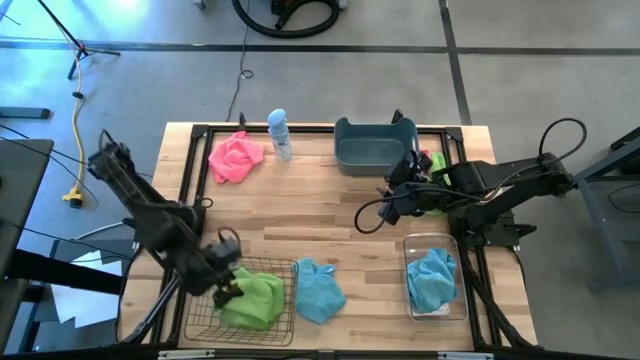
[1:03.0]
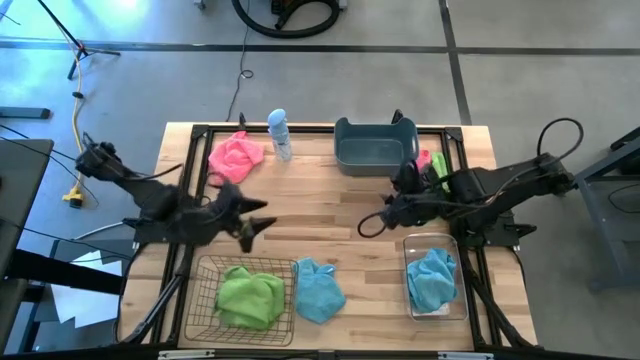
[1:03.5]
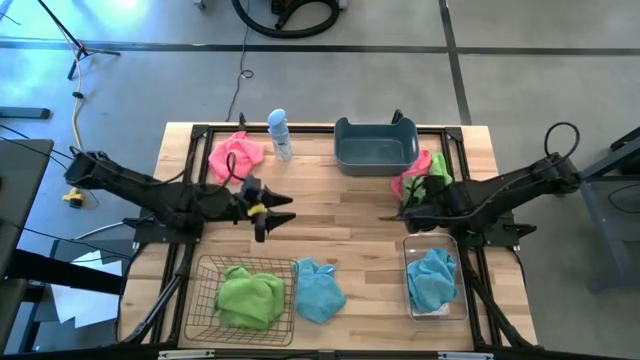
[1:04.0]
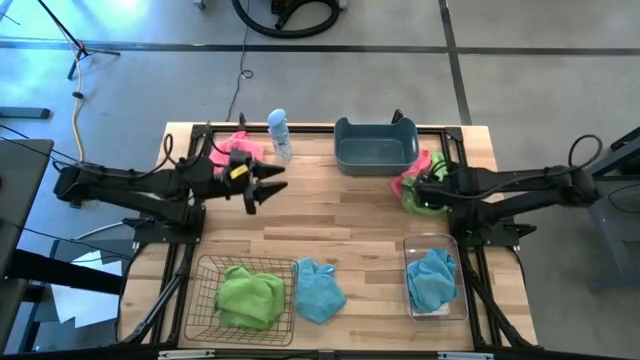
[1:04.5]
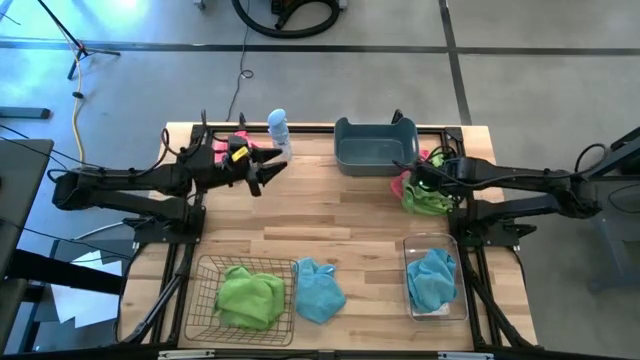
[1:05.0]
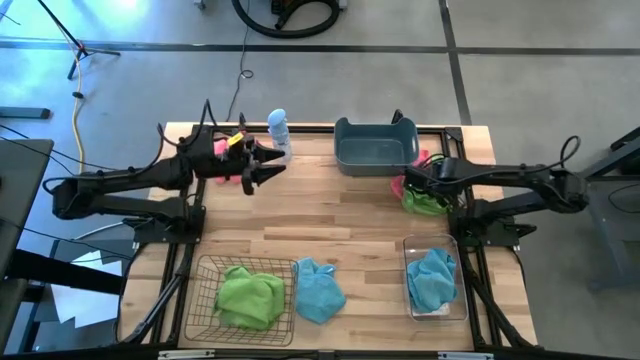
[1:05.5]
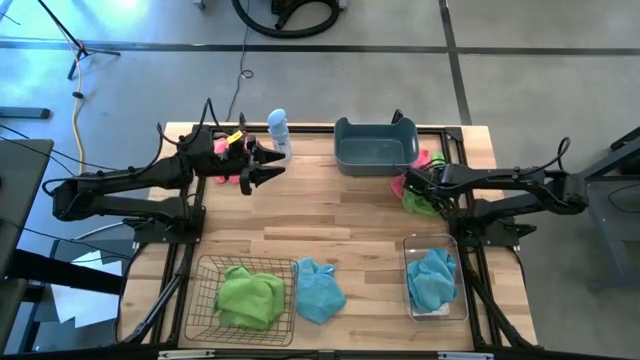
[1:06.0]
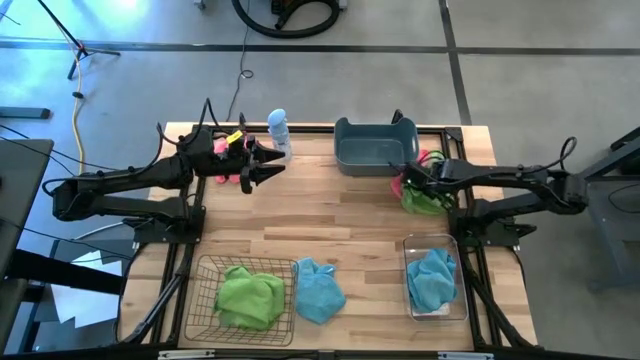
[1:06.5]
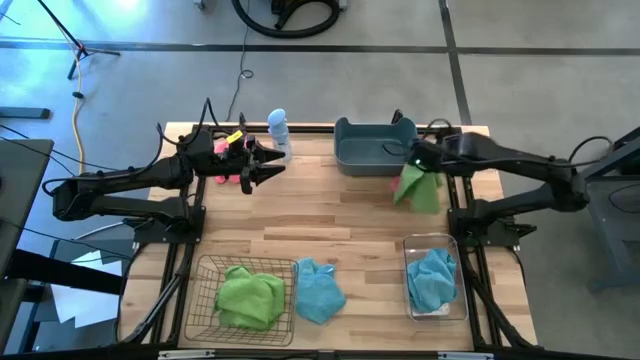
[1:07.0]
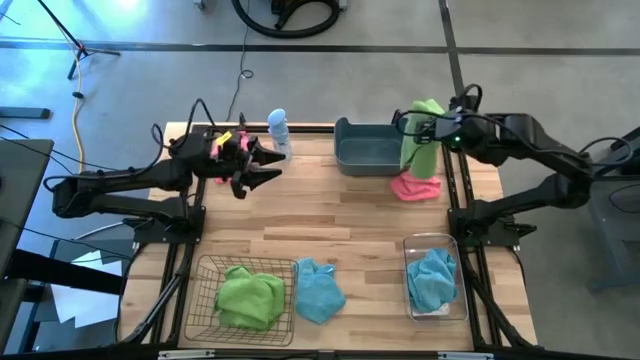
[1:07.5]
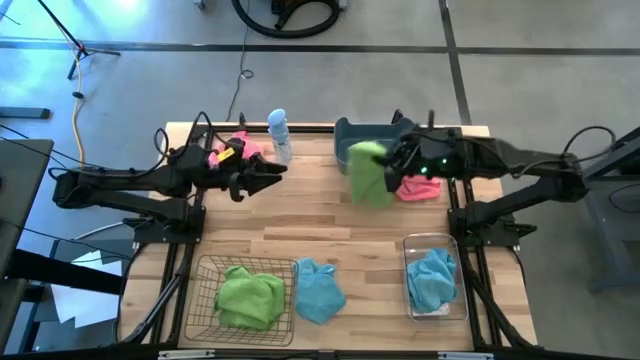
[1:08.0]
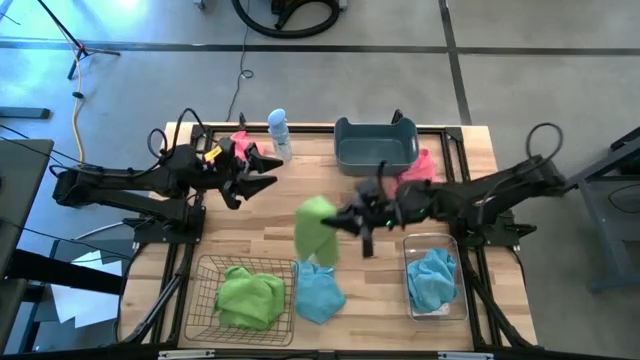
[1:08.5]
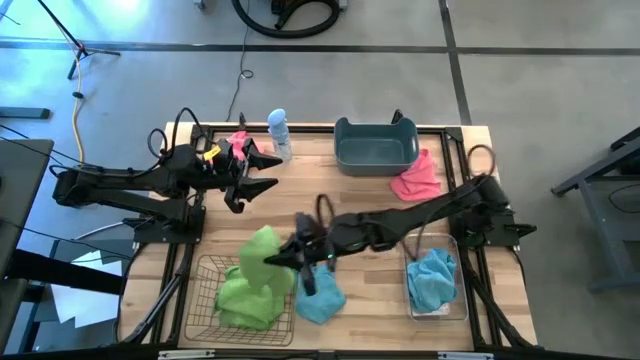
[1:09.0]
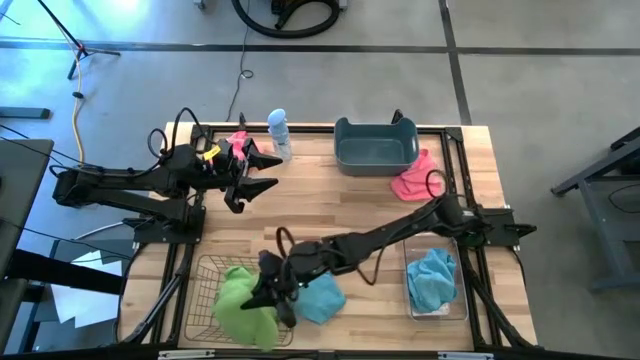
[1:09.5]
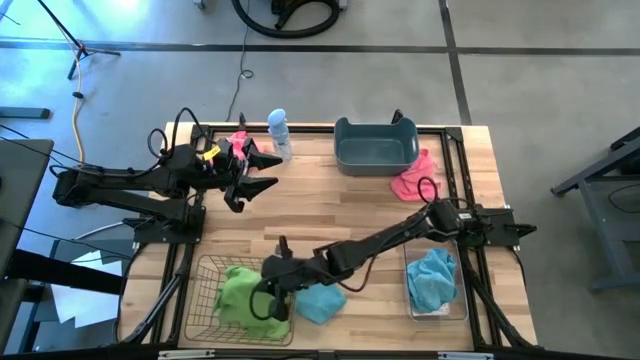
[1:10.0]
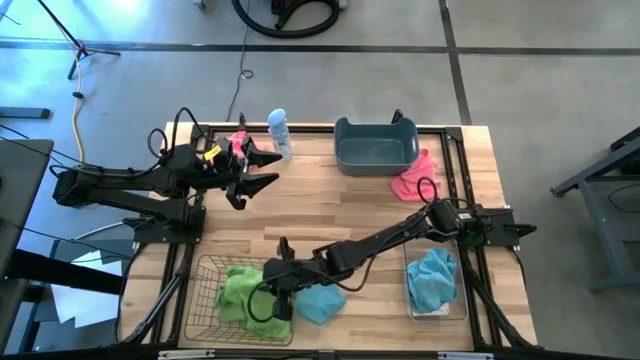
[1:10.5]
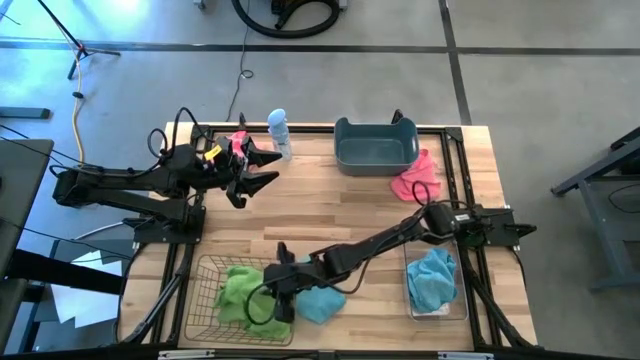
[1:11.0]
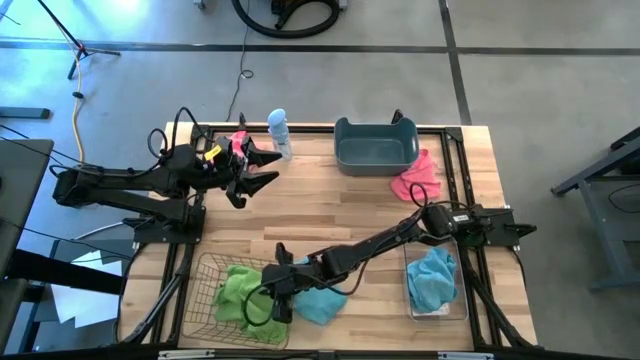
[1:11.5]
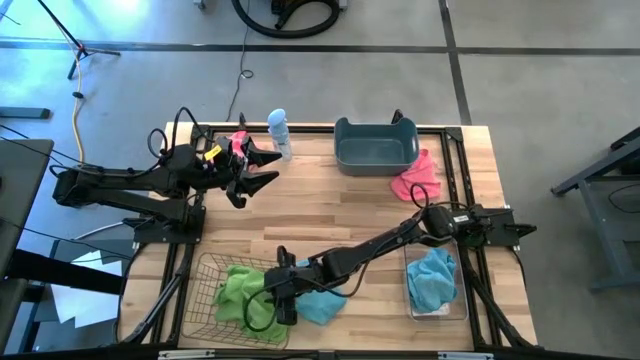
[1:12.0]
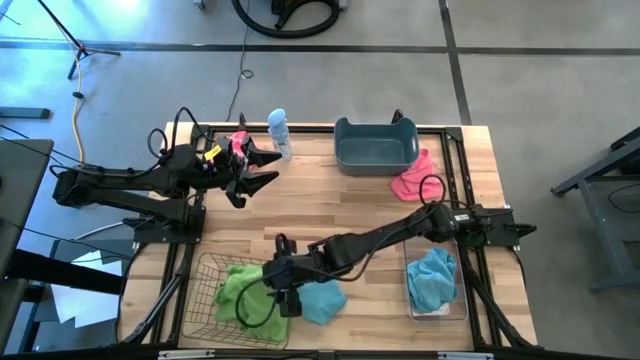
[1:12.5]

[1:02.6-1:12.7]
Task: Sort microfiber towel by color & place in baskets
Put the green towel into the wire basket

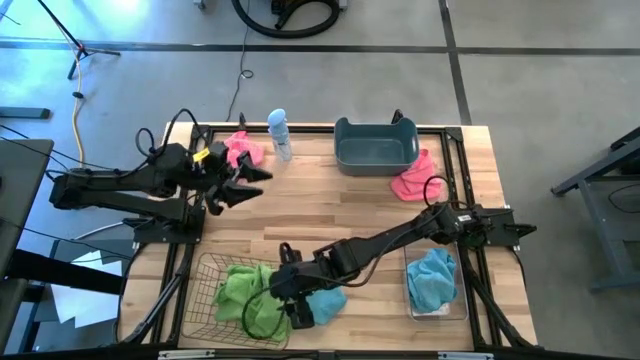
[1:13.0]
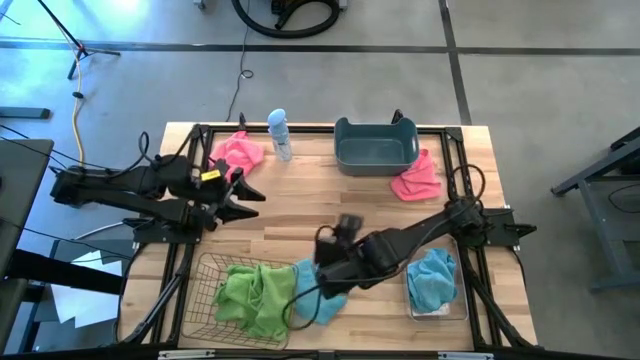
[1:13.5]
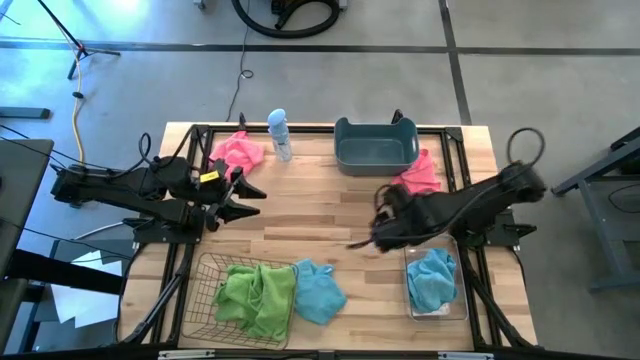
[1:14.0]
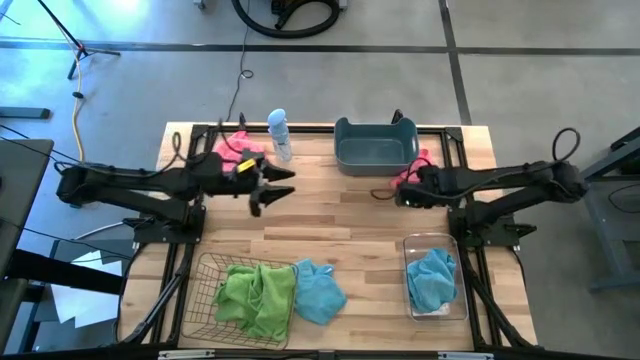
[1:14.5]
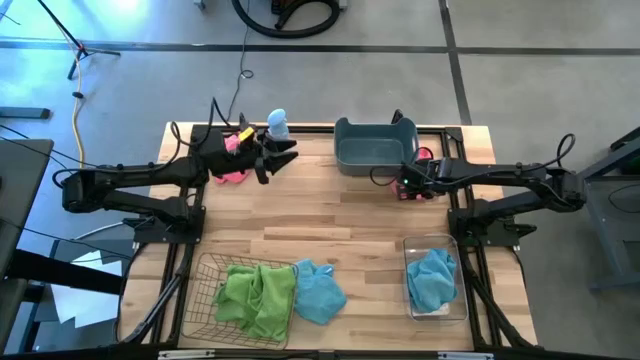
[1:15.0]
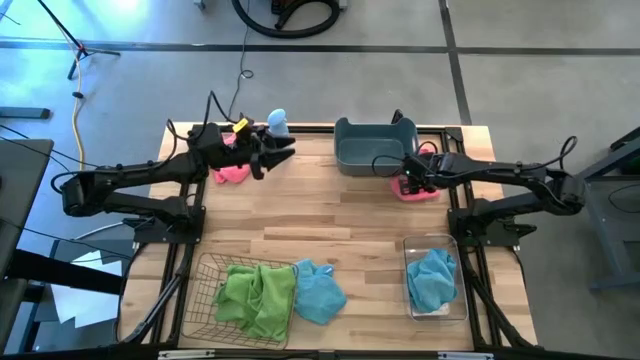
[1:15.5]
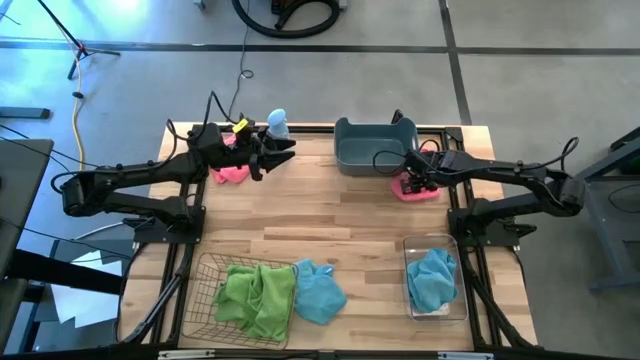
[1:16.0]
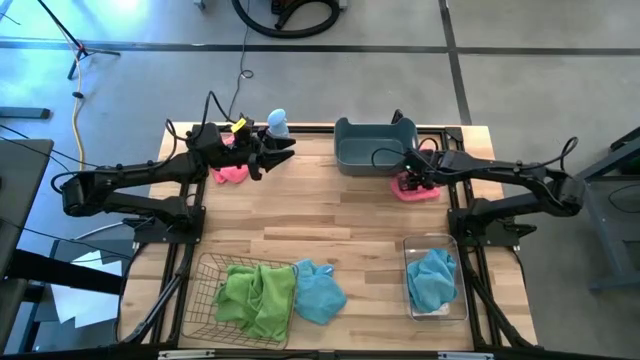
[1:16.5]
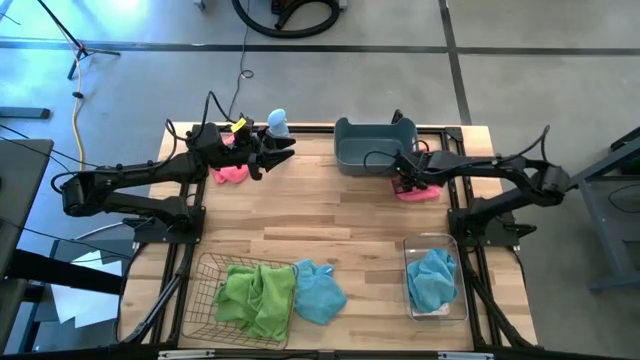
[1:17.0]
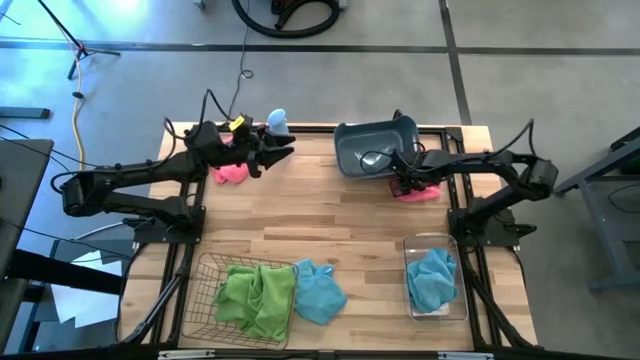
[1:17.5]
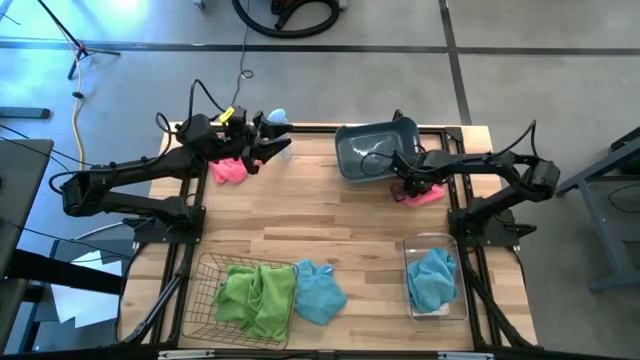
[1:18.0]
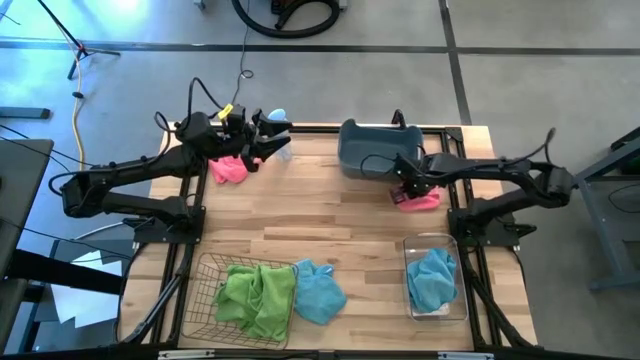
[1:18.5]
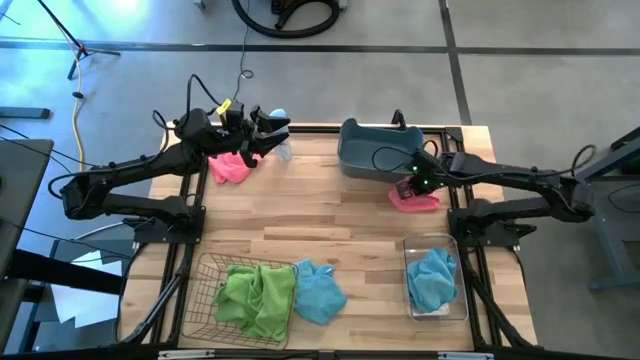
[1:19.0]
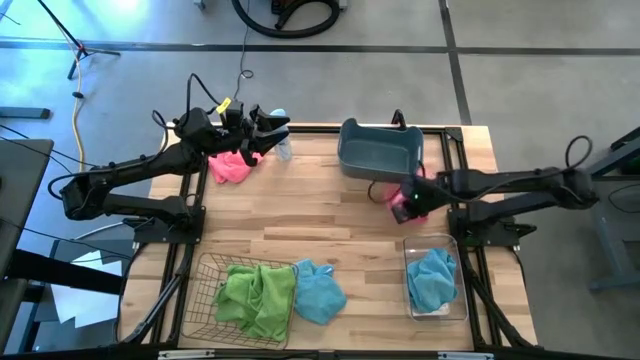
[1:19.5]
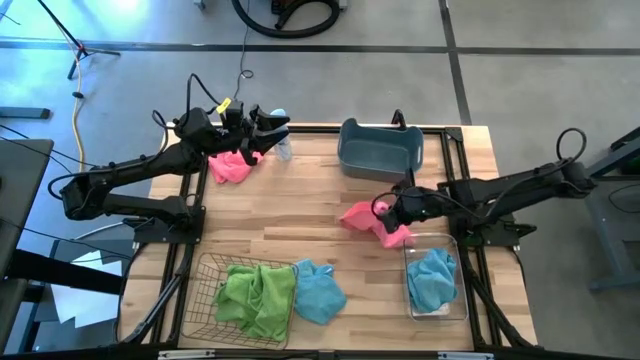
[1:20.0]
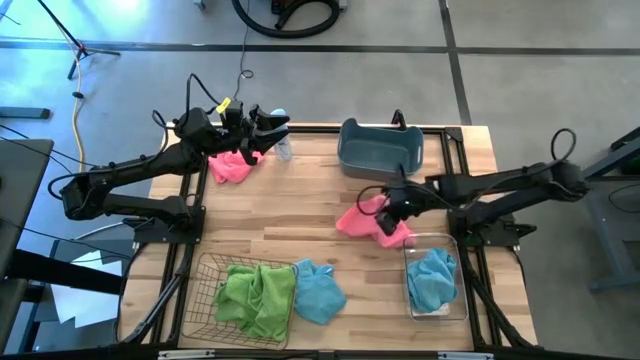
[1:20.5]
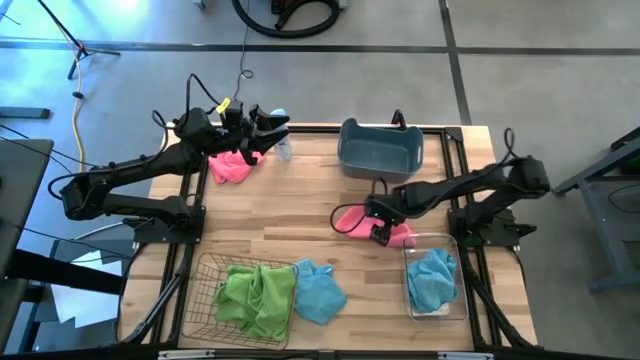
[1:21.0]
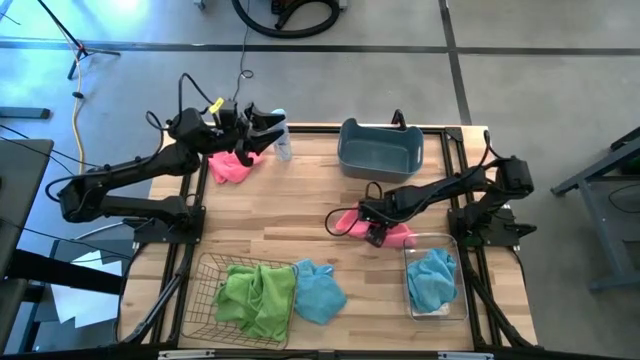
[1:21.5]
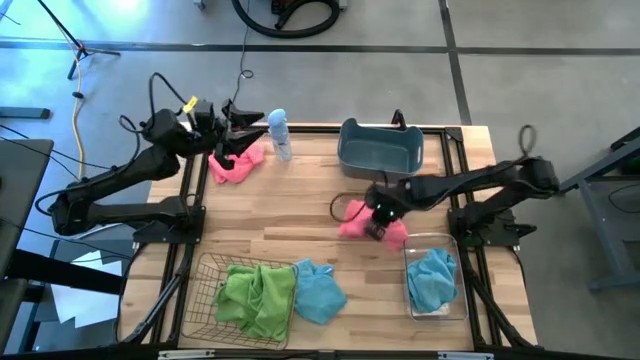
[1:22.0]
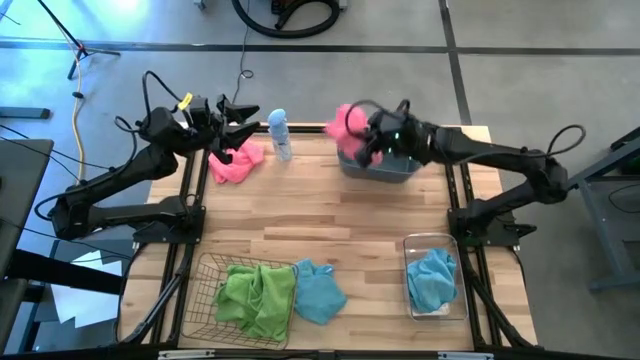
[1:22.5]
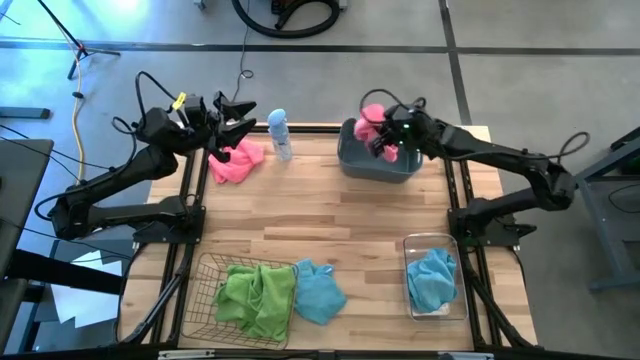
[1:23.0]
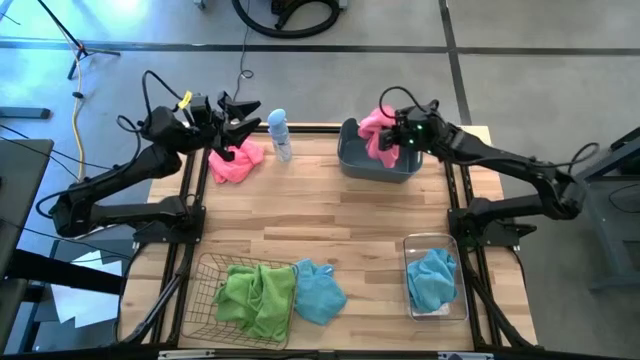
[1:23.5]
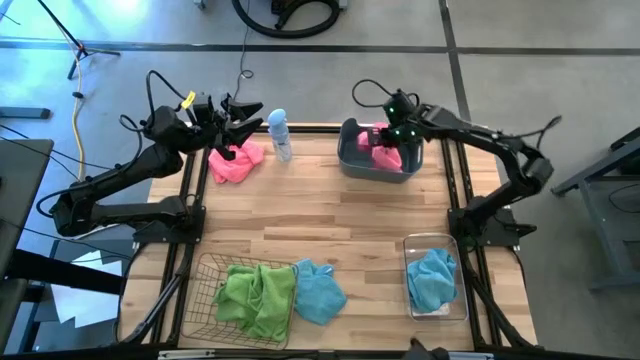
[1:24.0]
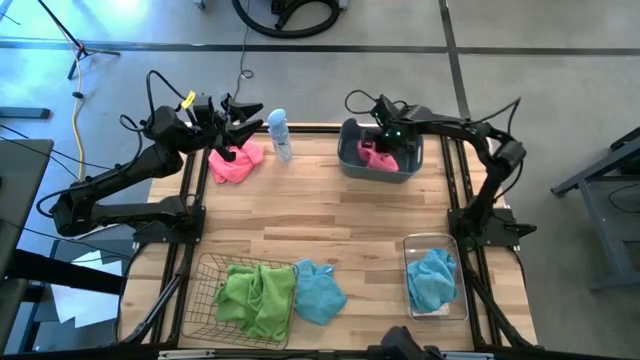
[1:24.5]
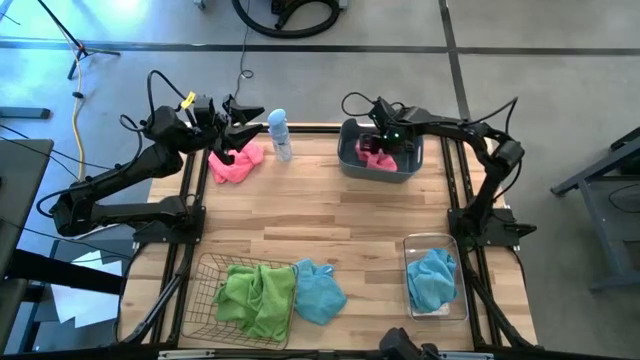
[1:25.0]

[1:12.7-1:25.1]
Put the pink towel into the dark blue bin
